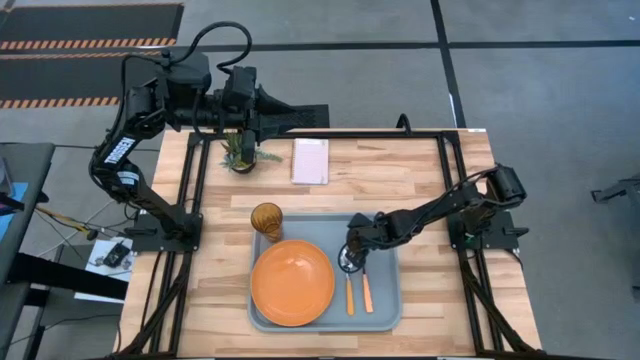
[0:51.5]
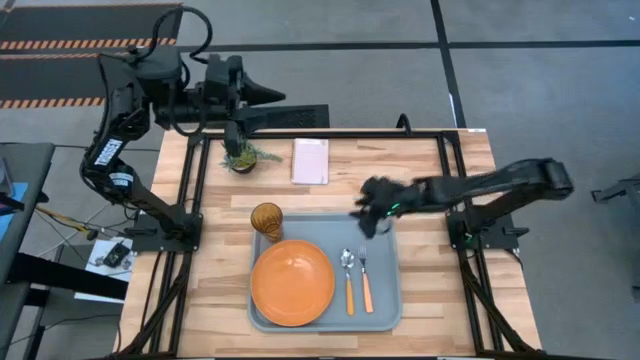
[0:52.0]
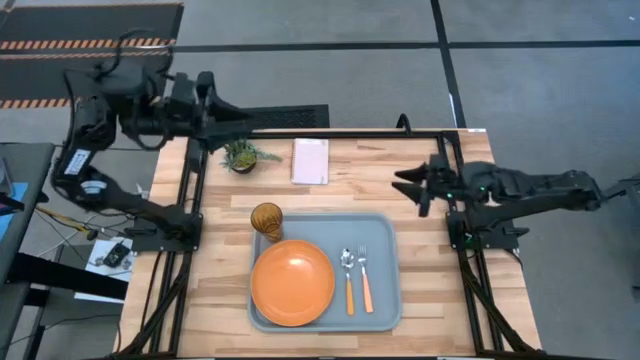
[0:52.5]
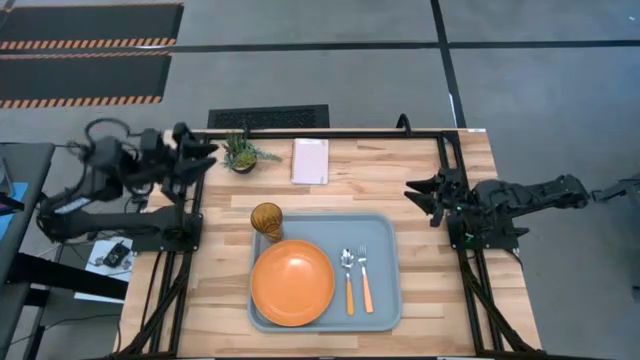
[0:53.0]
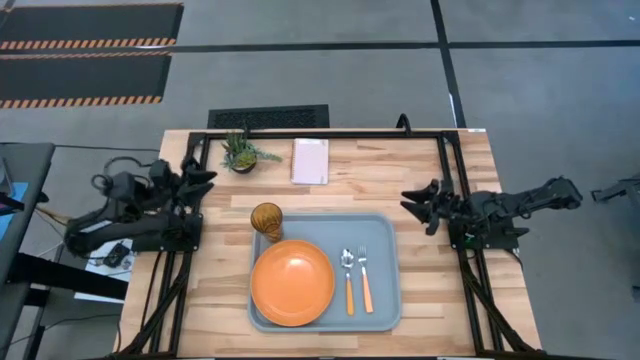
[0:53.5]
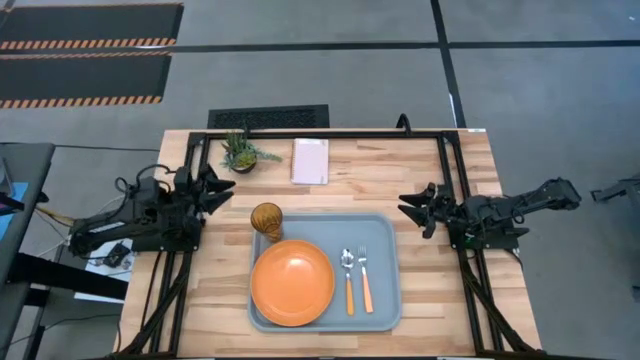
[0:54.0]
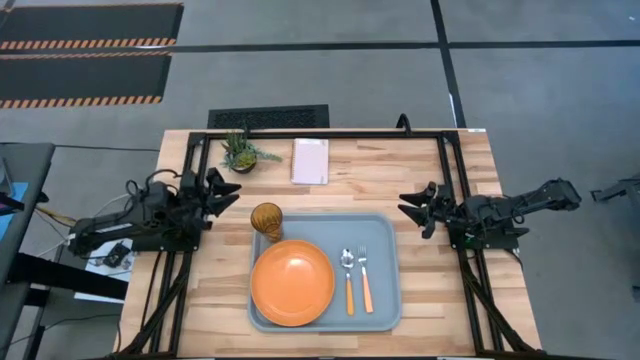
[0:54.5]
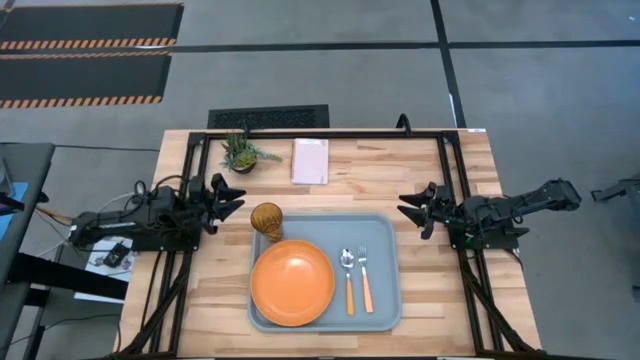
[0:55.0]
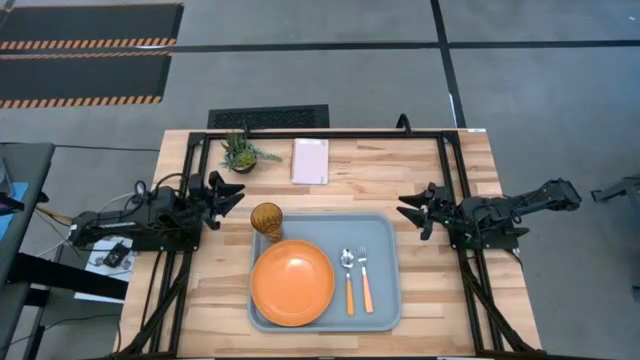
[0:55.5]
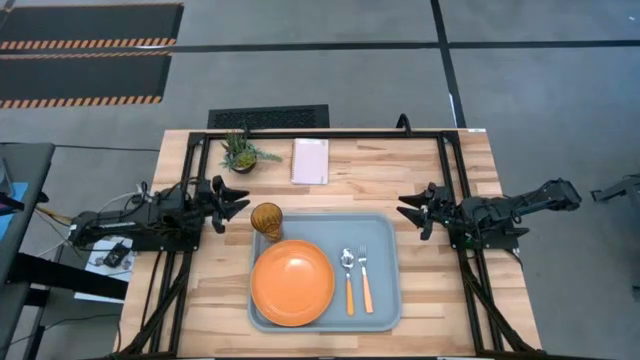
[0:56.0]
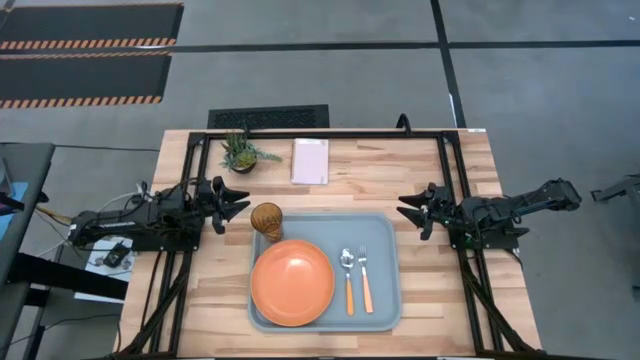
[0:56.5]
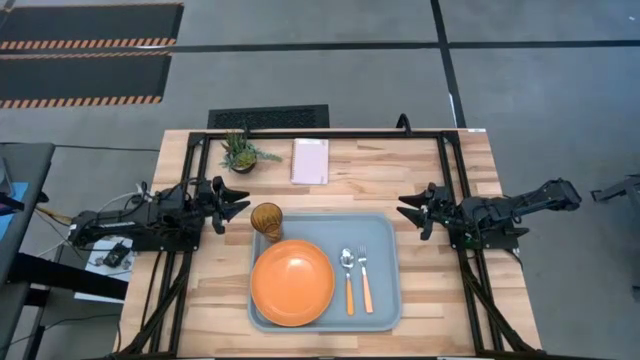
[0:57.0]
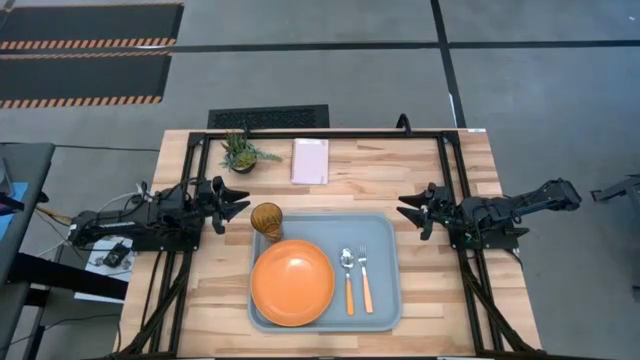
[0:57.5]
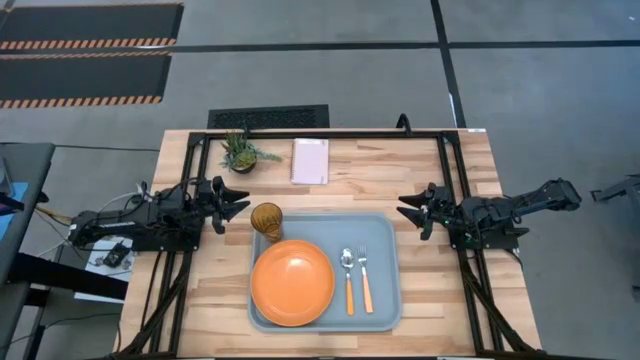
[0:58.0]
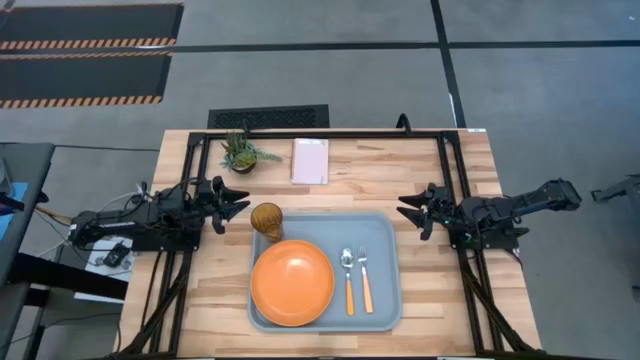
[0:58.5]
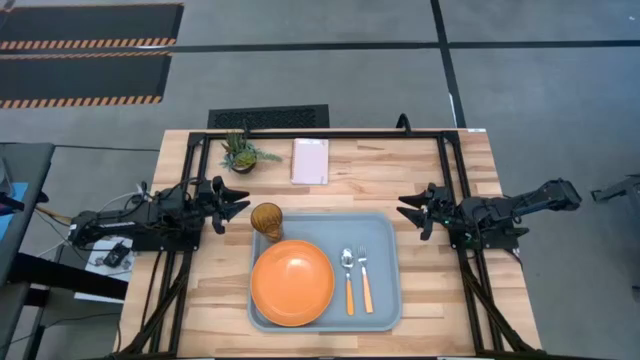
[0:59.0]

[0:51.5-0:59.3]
Task: Pick and place plate/cup/fork/spoon on tray
Return to Home Position

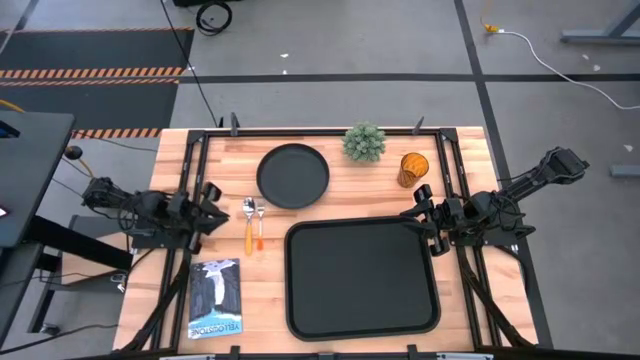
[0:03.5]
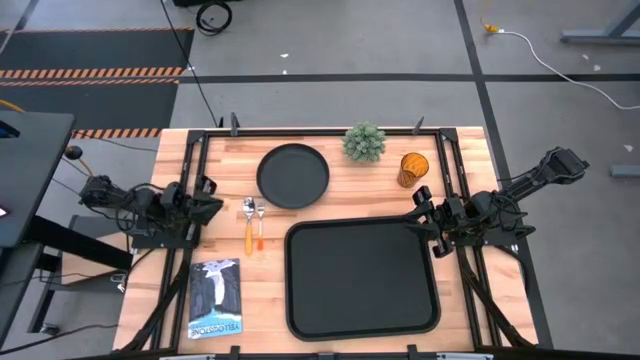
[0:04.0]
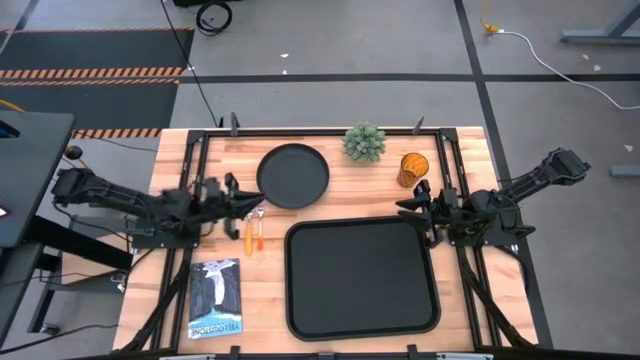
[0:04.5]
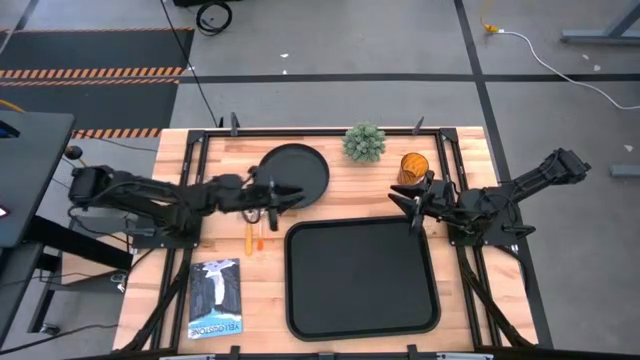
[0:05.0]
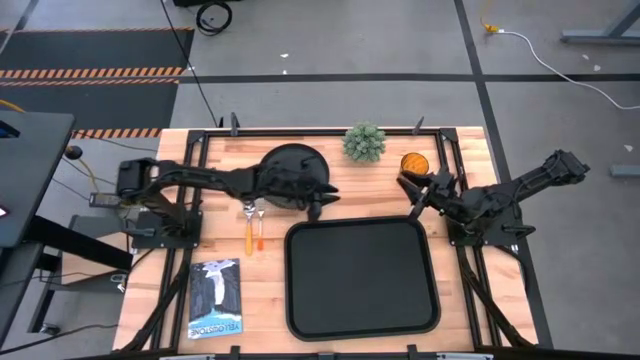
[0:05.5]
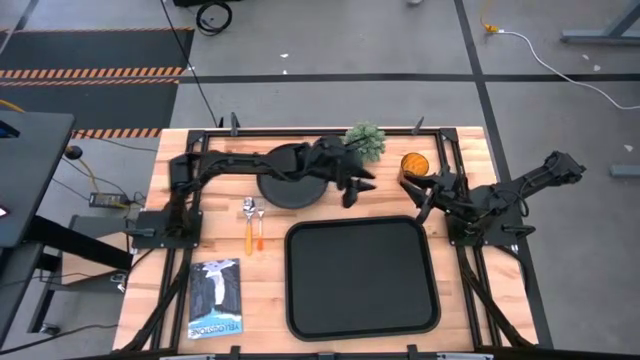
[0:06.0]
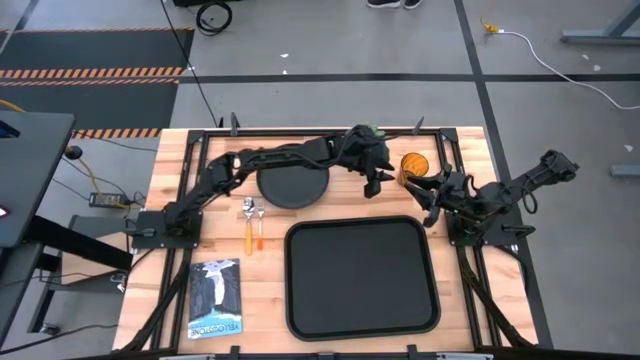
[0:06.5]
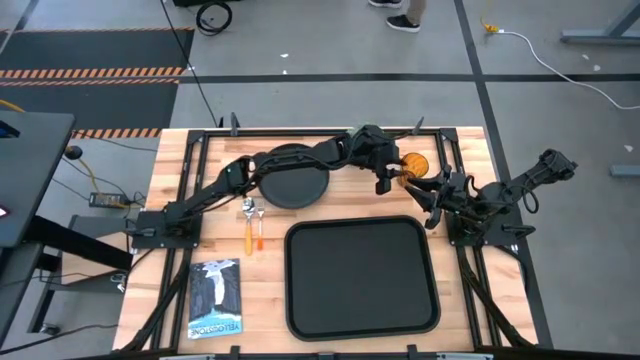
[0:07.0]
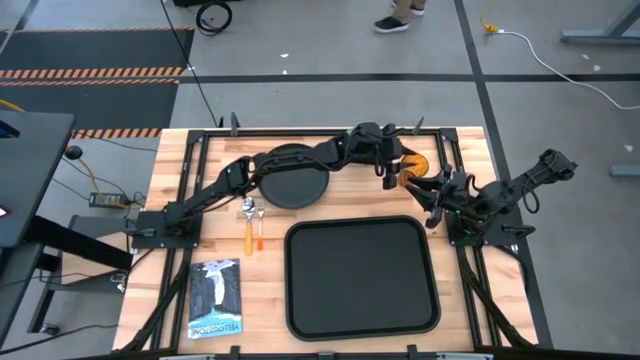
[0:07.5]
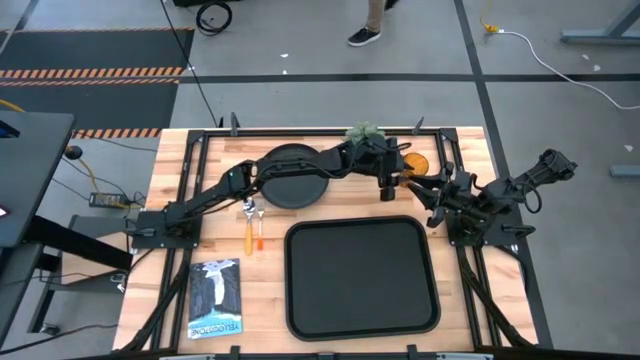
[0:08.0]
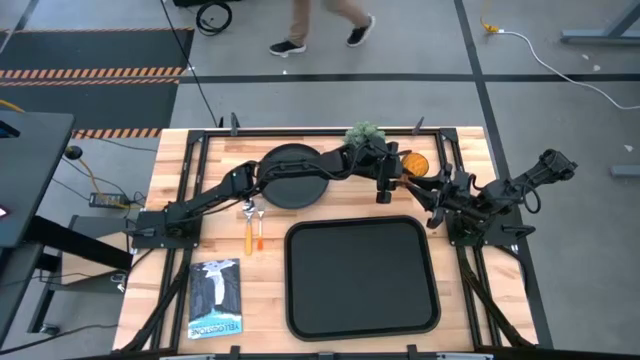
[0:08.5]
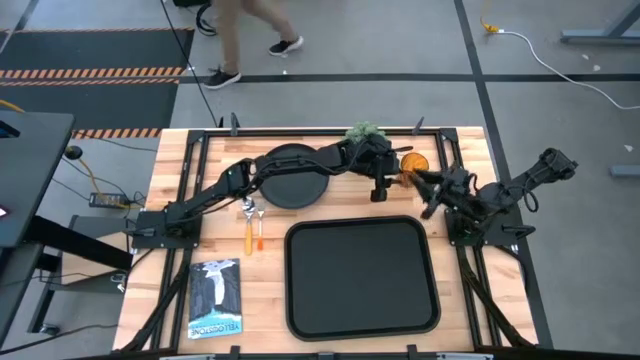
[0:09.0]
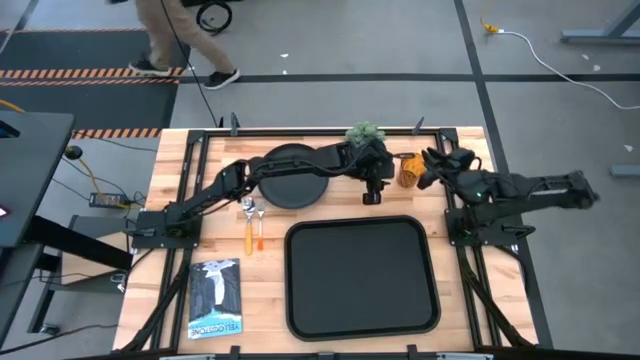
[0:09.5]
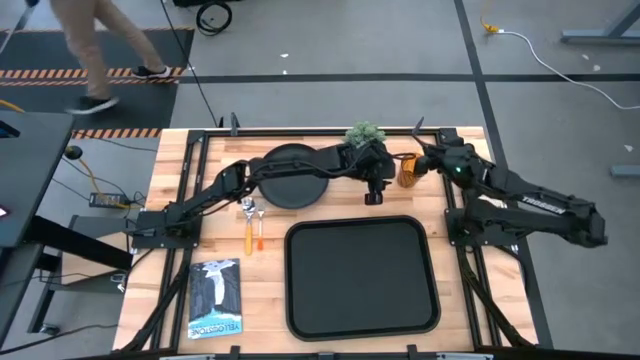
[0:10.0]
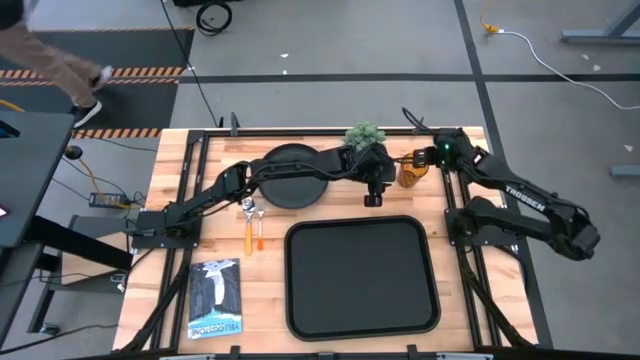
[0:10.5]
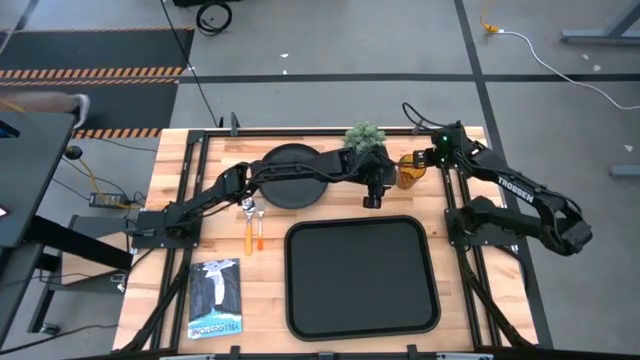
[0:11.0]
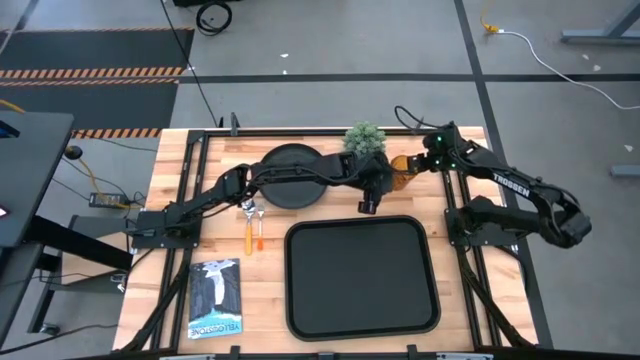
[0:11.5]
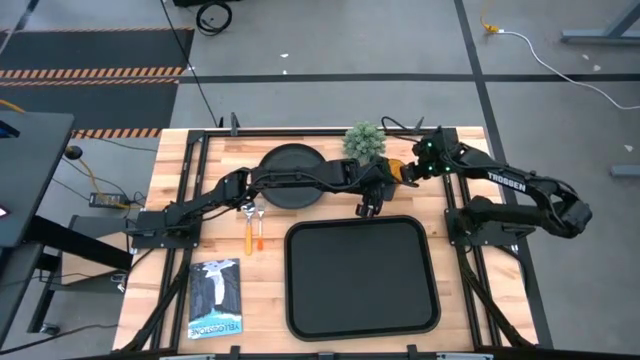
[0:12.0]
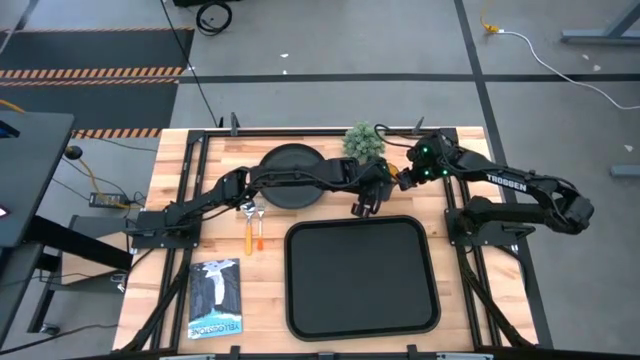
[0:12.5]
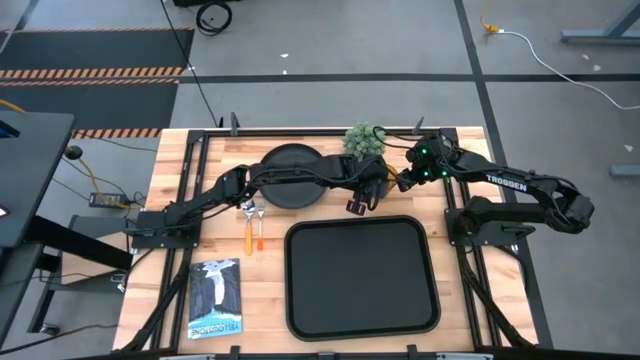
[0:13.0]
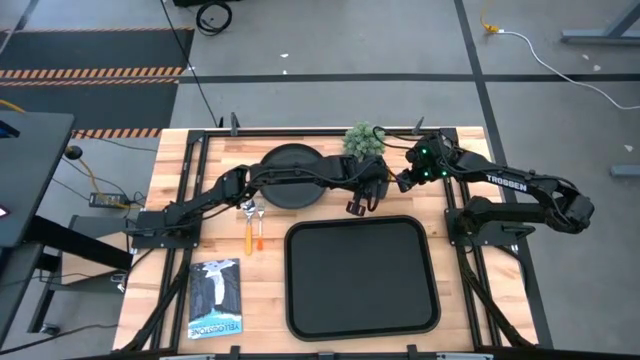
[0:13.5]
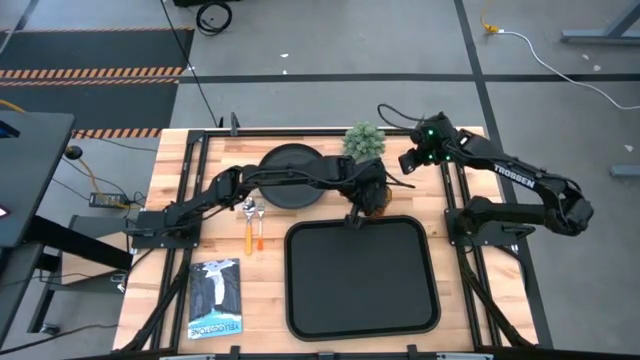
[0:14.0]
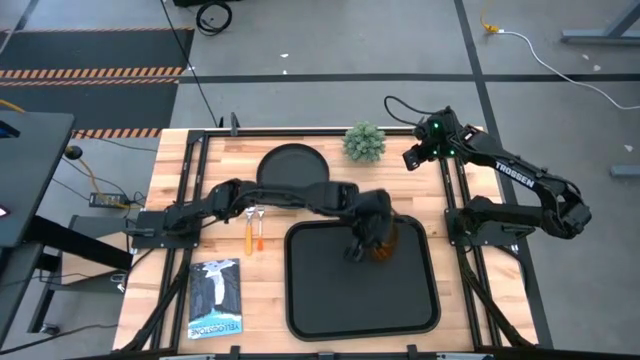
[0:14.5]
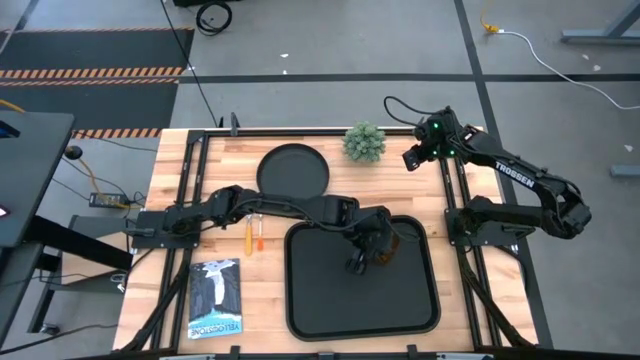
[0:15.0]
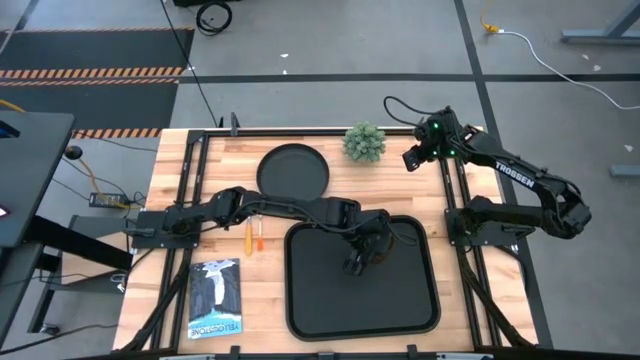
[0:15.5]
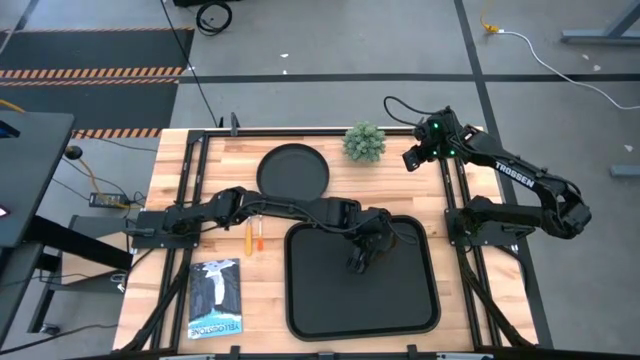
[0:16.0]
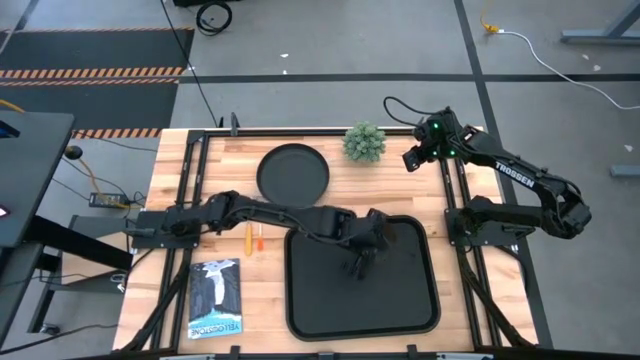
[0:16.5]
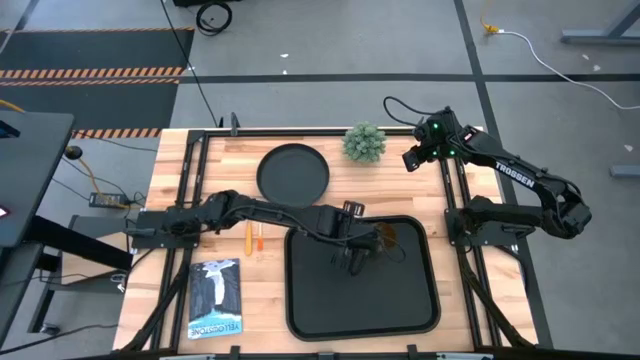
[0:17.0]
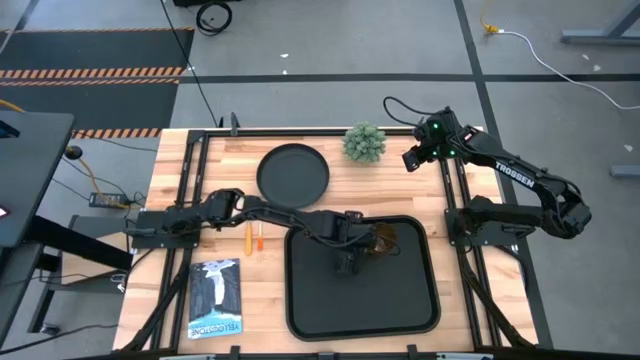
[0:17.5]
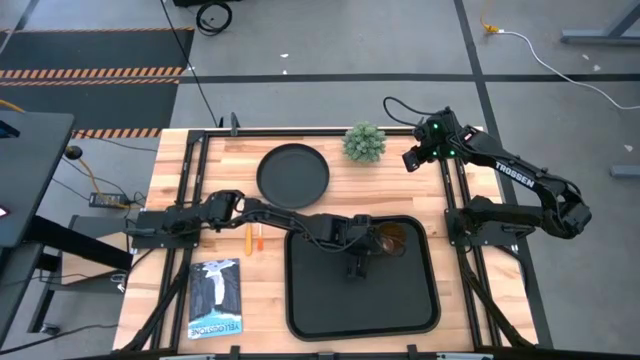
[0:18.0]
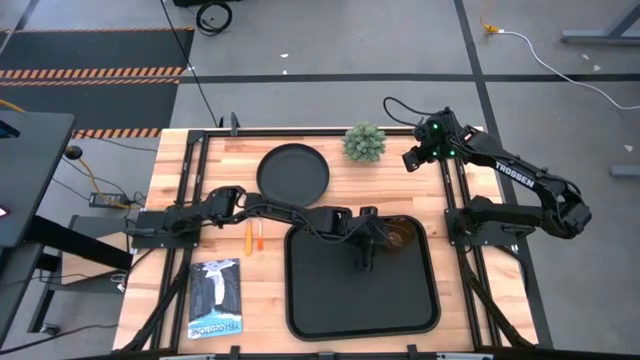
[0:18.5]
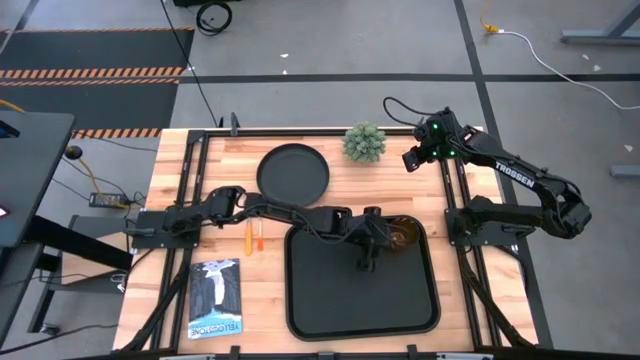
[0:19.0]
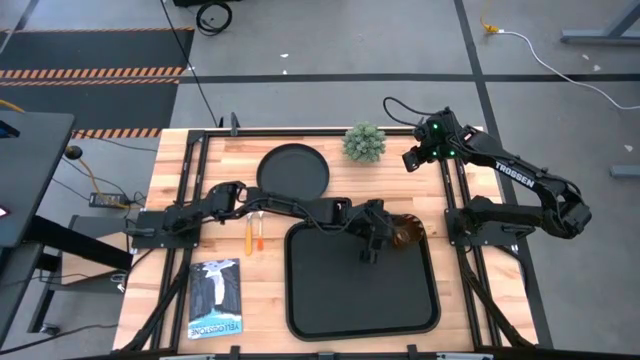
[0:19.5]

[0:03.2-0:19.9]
Task: Pick and place plate/cup/fork/spoon on tray
Put the brown cup on the black serving tray
